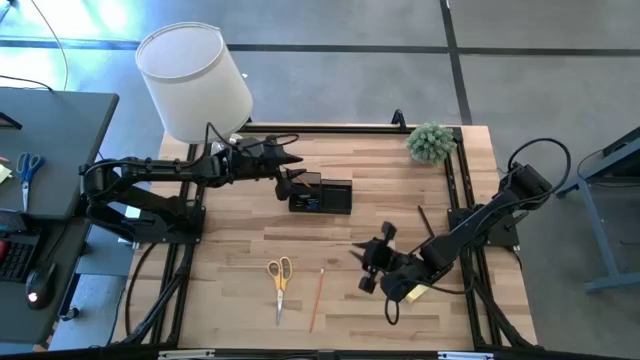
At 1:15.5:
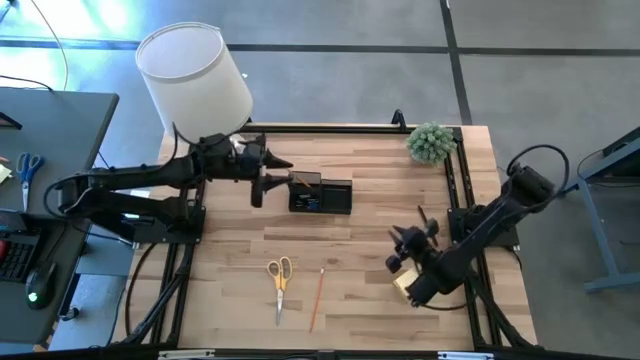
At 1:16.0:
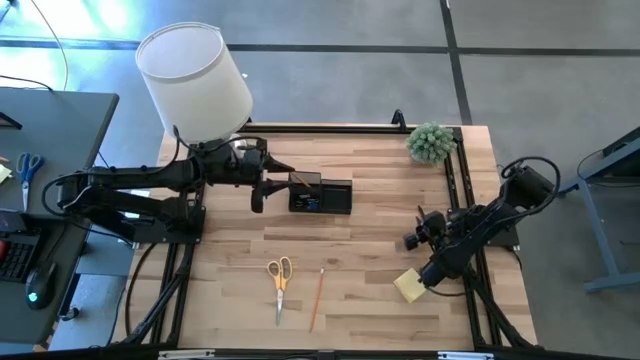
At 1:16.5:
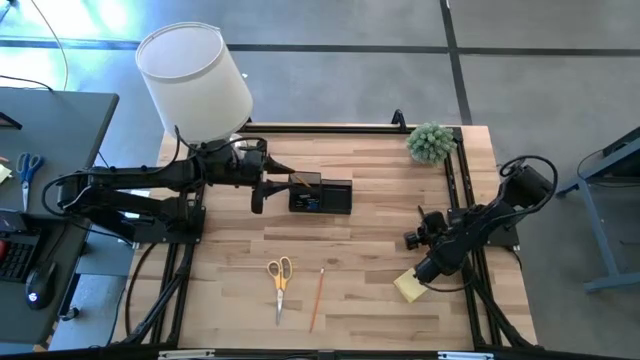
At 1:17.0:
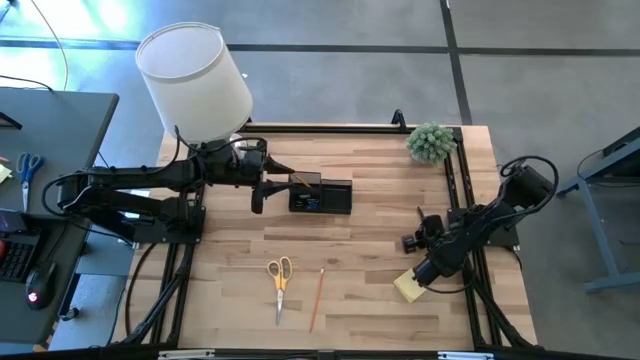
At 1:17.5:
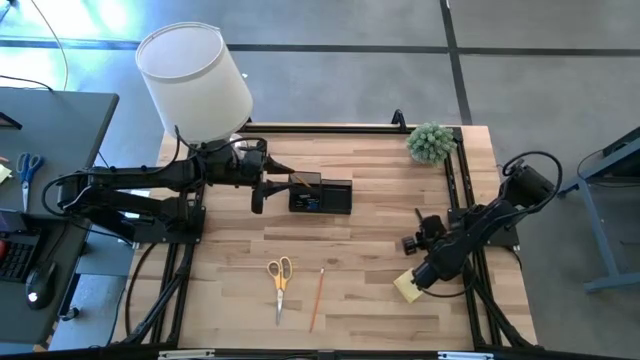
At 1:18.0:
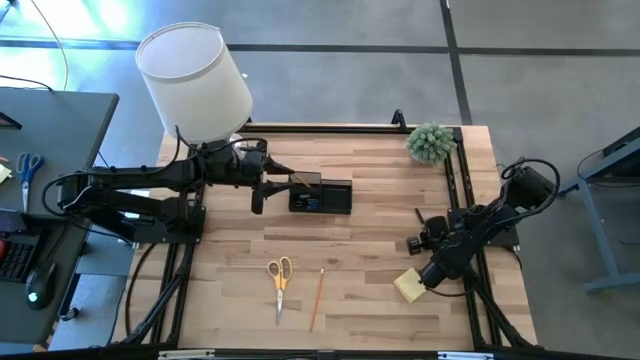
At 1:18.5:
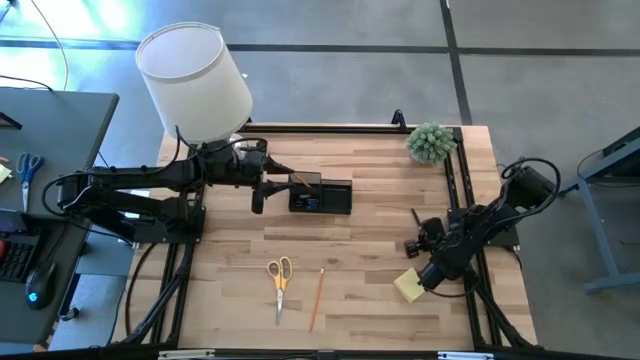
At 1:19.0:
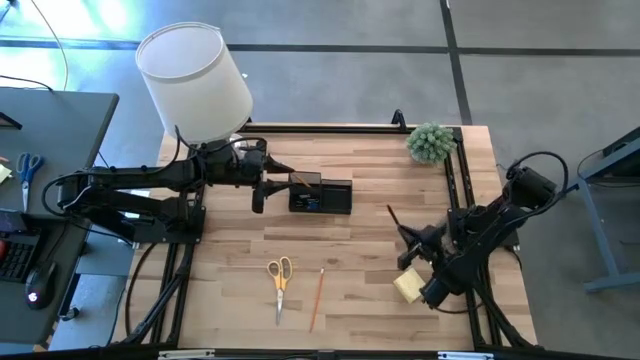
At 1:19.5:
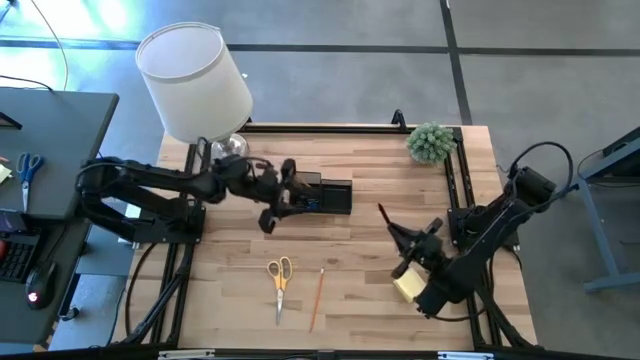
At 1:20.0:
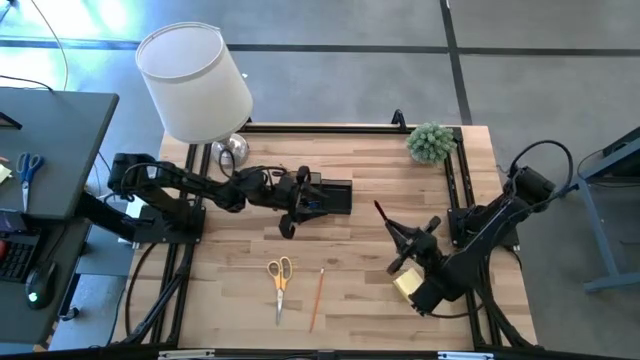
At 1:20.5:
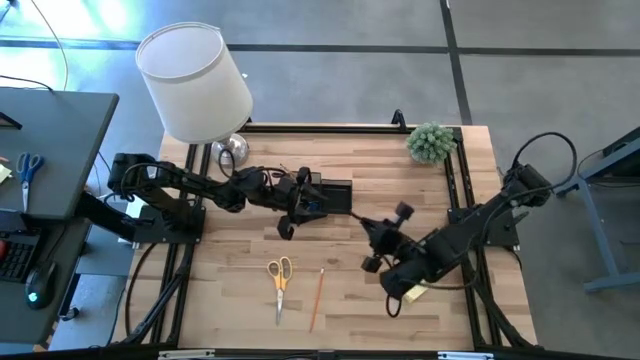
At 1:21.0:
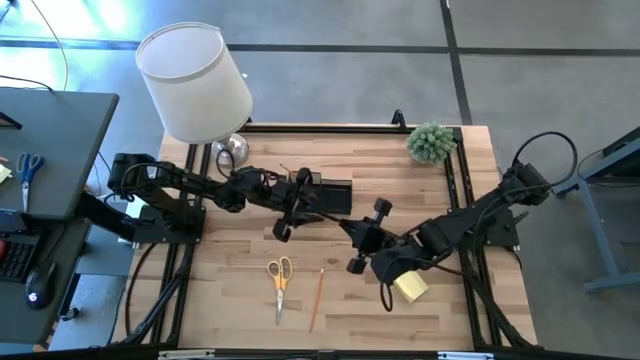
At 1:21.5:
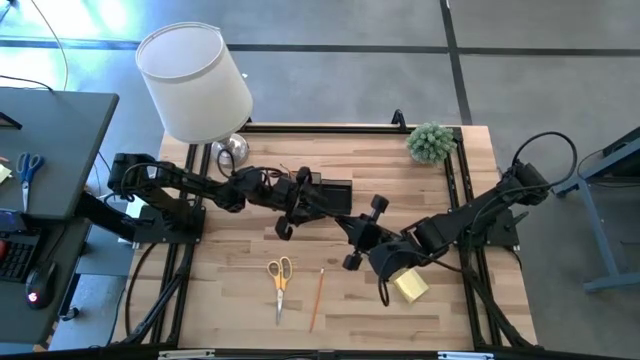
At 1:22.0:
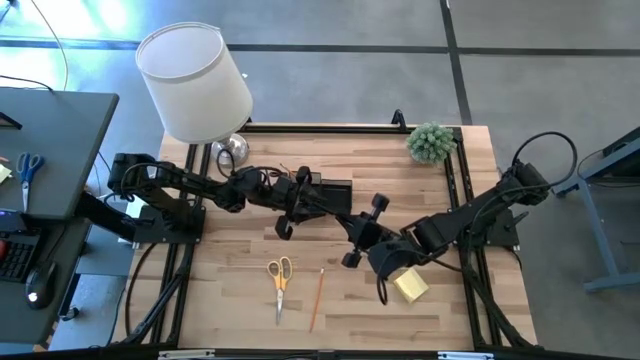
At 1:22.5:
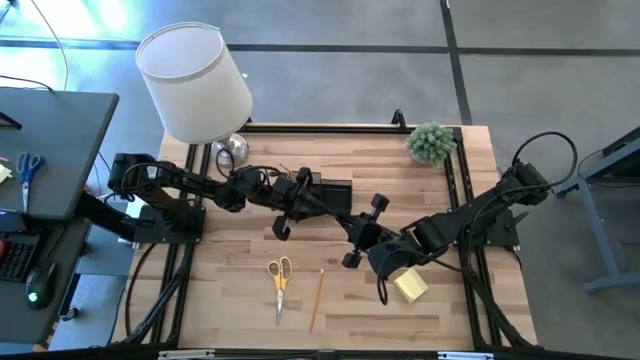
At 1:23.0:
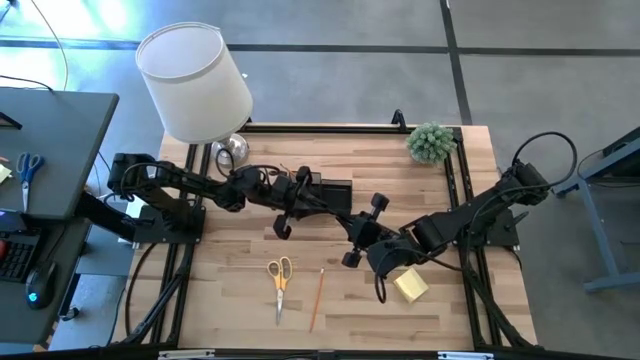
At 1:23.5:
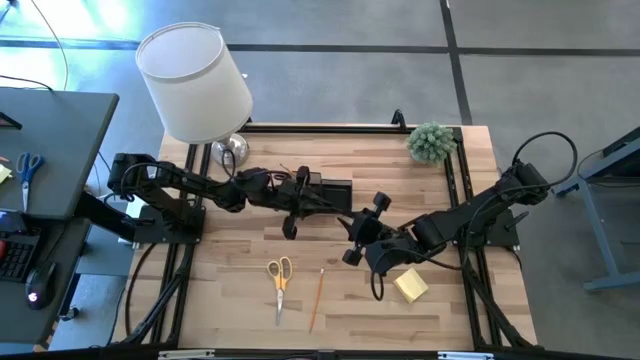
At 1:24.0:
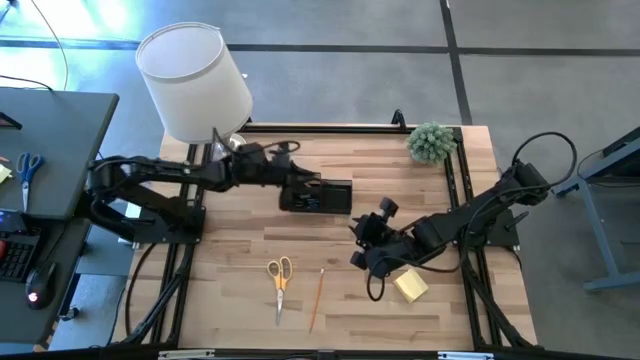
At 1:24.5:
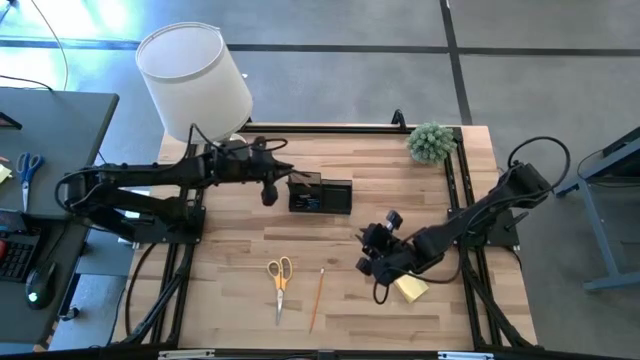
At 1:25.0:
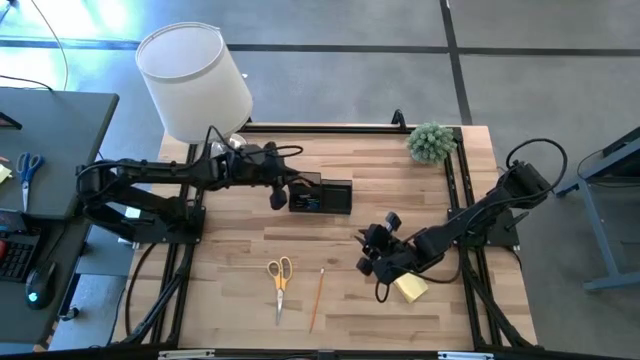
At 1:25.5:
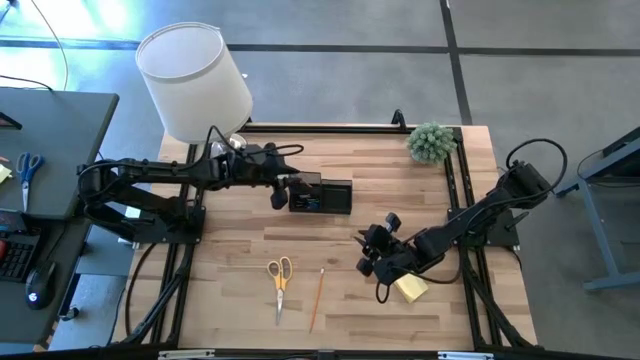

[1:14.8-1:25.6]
Task: Pick and place office supplies into organizer
Put the black pen into the desk organizer

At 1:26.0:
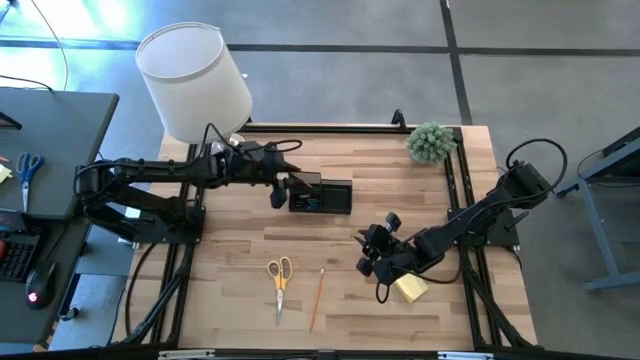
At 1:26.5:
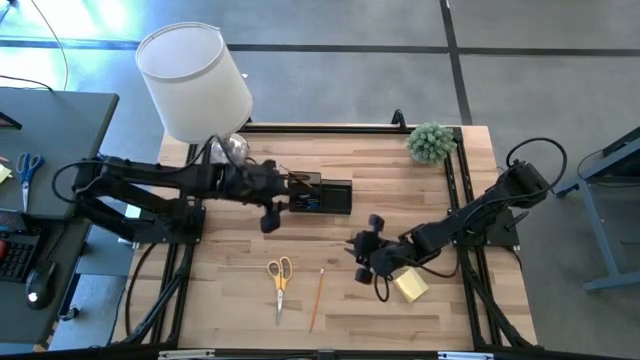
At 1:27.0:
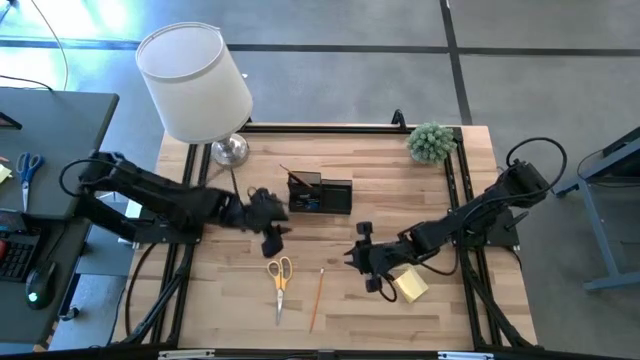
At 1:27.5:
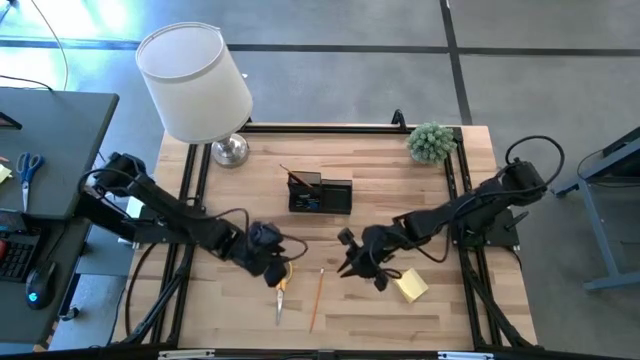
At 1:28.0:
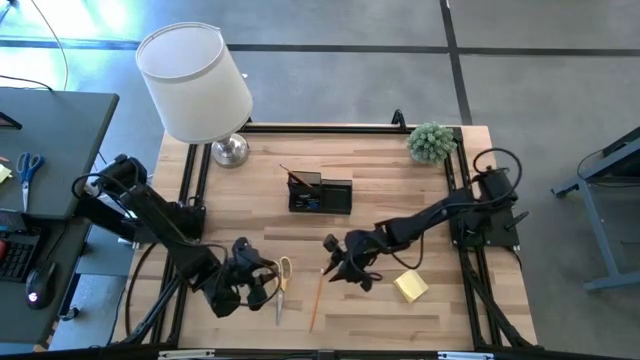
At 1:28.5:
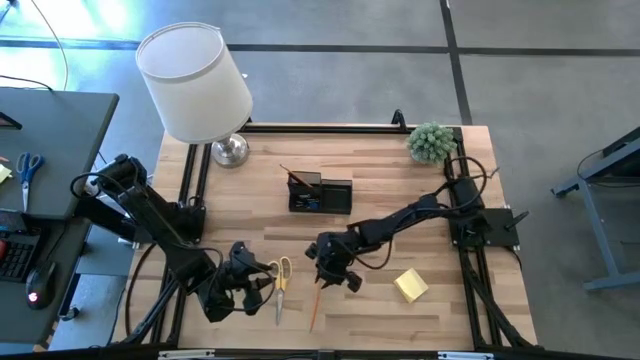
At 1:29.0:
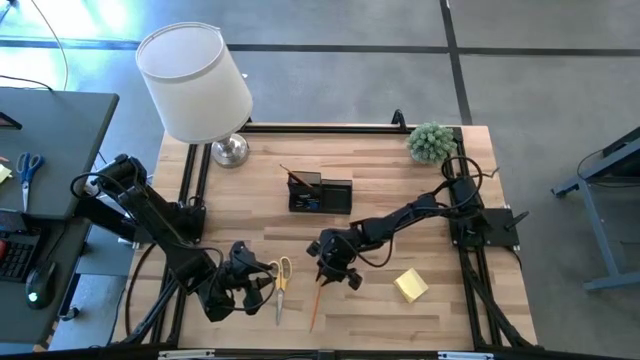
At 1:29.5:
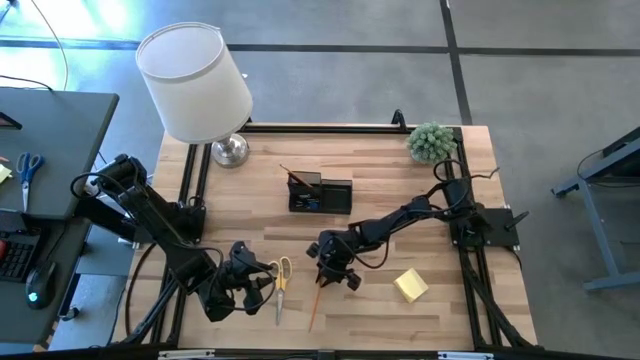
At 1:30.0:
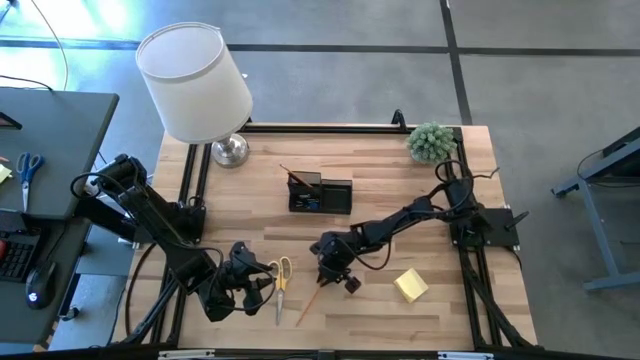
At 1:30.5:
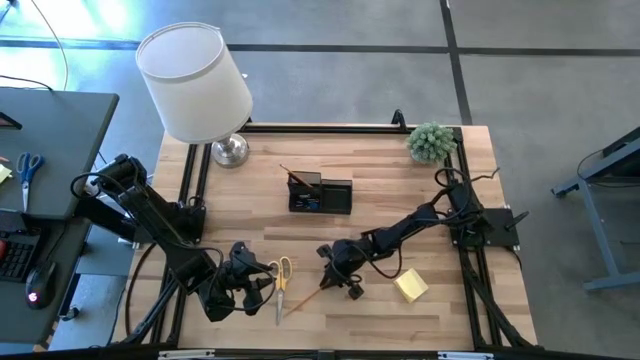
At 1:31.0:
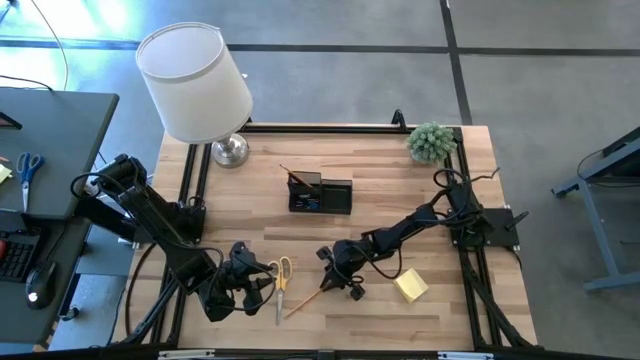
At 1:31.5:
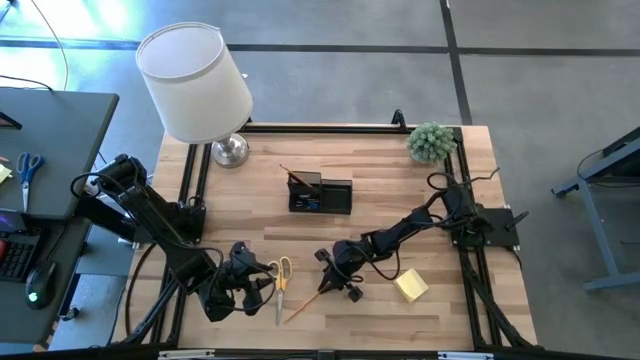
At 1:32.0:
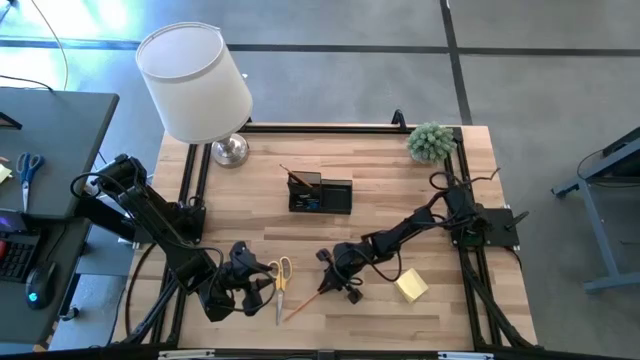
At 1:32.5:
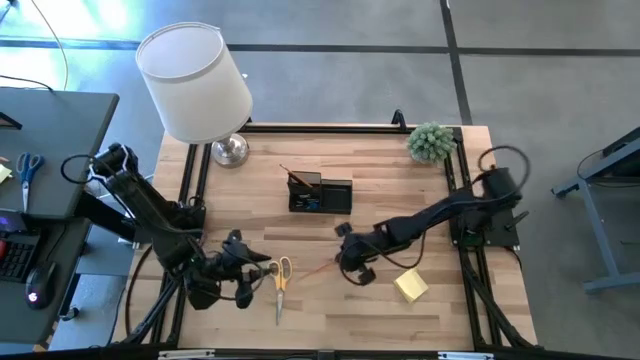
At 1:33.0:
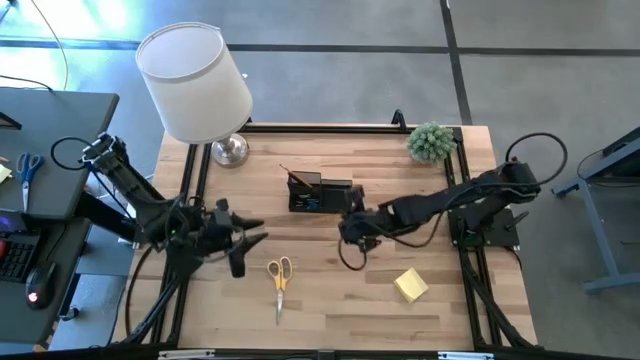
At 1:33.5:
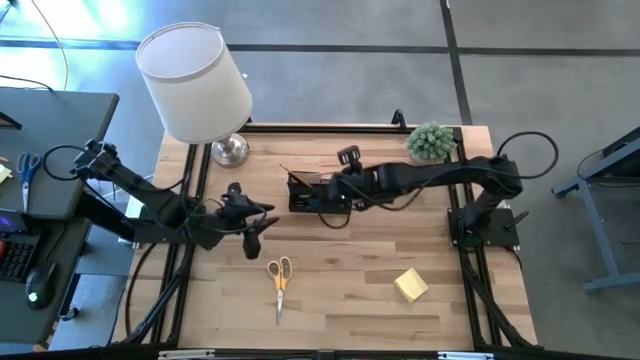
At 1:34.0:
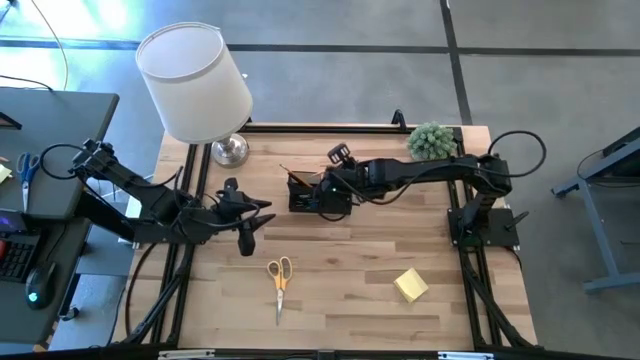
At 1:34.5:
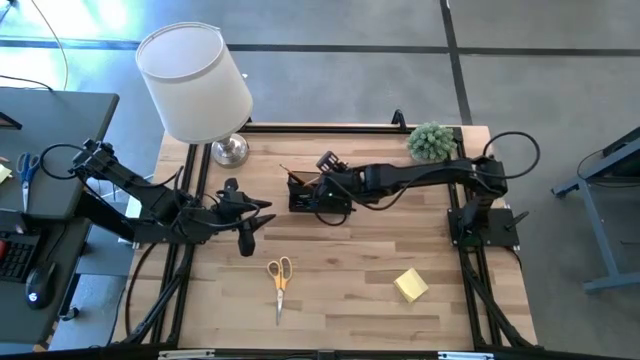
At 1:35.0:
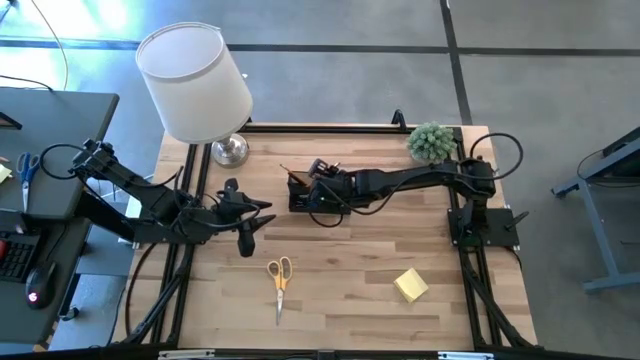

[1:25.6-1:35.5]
Put the orange pencil into the desk organizer
